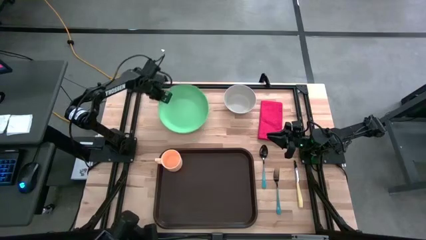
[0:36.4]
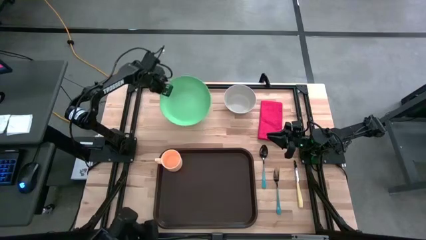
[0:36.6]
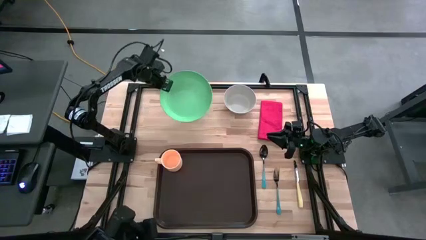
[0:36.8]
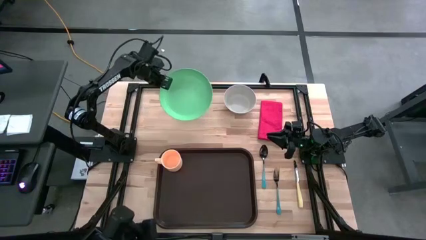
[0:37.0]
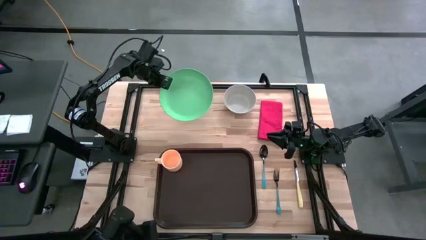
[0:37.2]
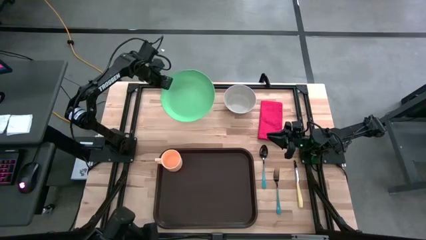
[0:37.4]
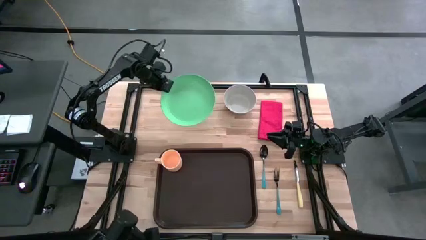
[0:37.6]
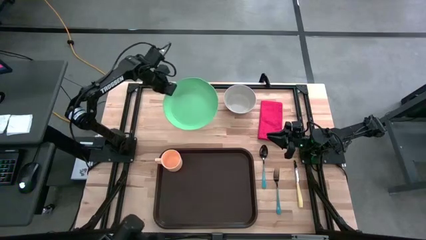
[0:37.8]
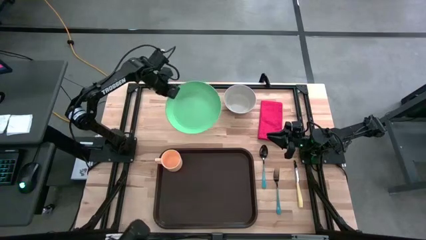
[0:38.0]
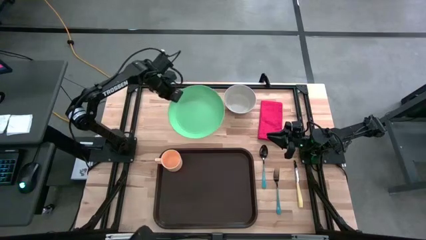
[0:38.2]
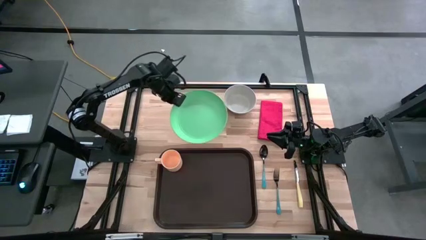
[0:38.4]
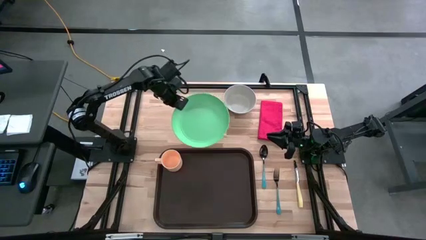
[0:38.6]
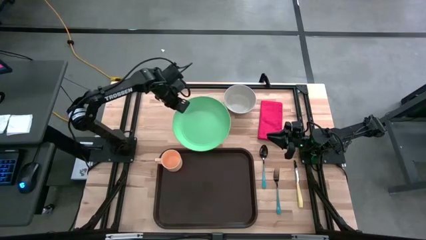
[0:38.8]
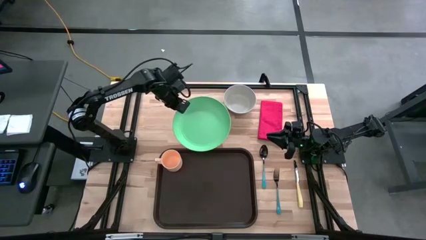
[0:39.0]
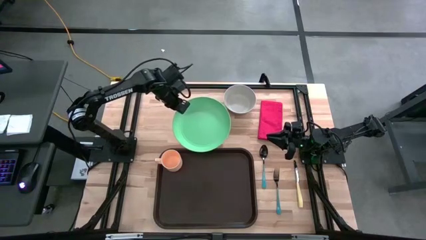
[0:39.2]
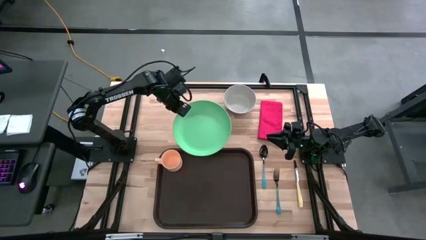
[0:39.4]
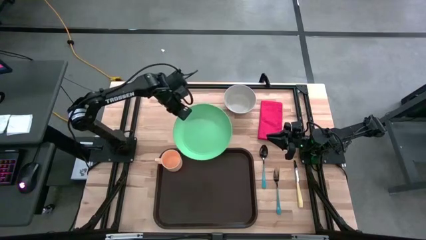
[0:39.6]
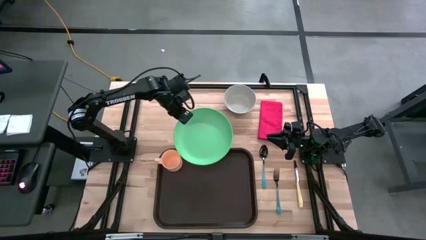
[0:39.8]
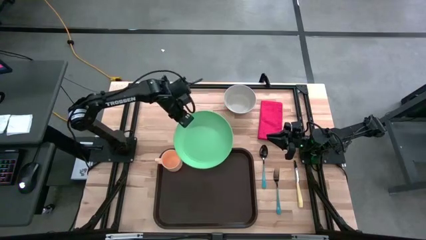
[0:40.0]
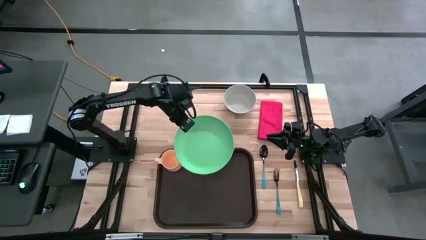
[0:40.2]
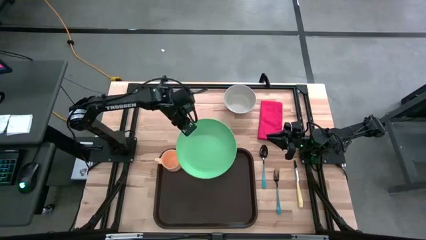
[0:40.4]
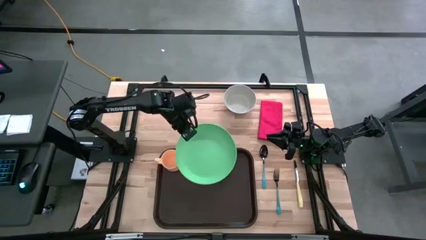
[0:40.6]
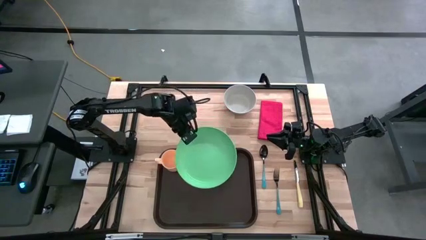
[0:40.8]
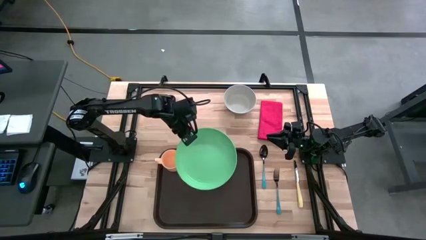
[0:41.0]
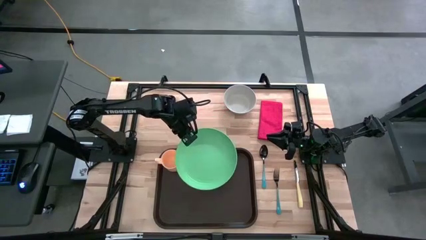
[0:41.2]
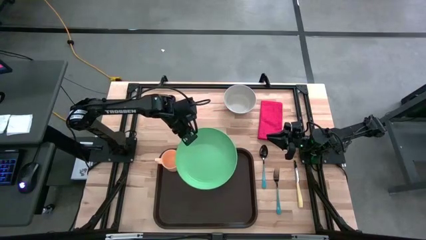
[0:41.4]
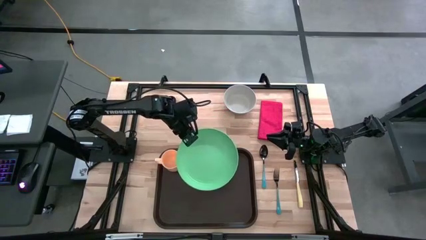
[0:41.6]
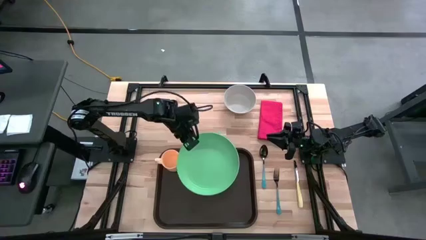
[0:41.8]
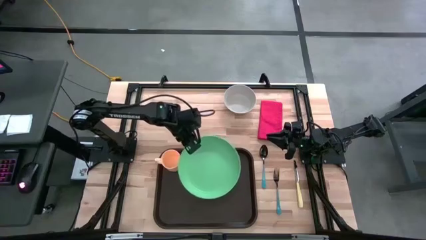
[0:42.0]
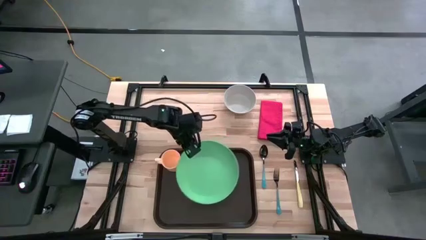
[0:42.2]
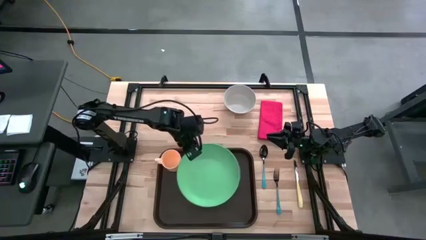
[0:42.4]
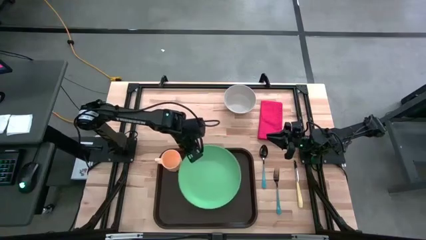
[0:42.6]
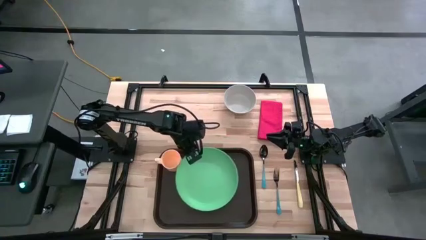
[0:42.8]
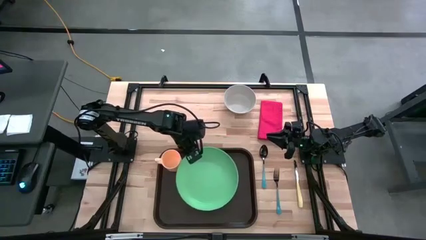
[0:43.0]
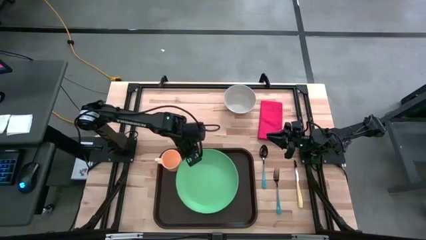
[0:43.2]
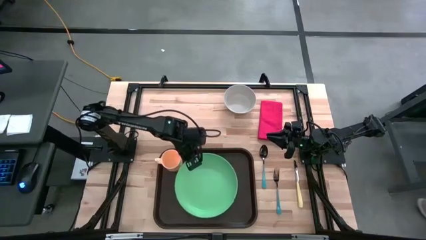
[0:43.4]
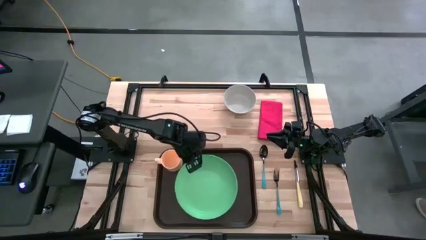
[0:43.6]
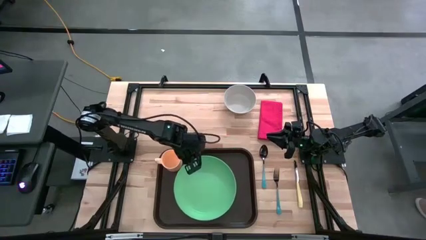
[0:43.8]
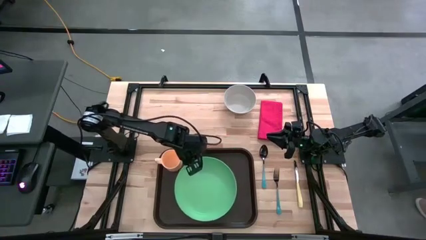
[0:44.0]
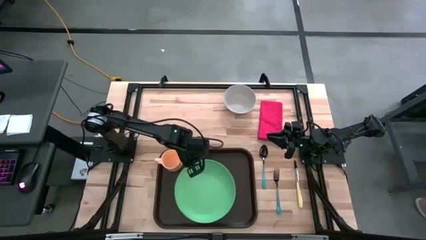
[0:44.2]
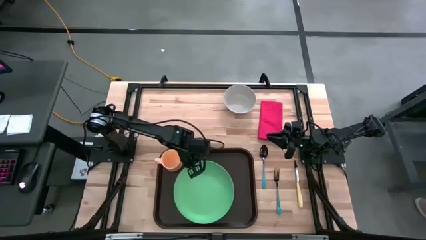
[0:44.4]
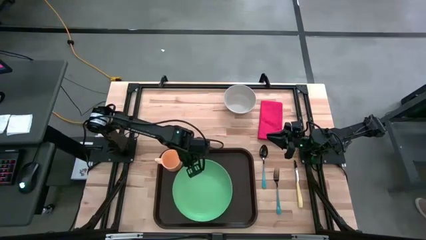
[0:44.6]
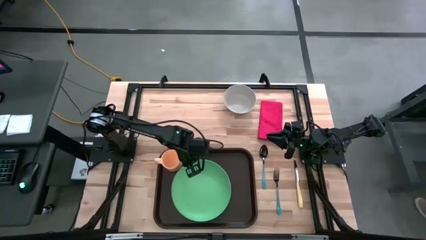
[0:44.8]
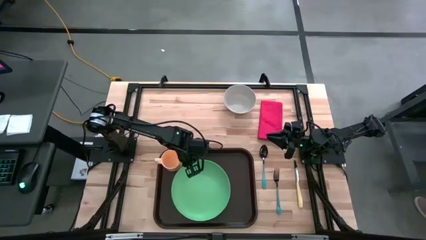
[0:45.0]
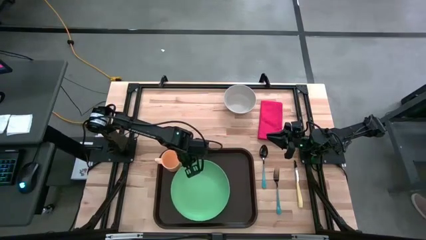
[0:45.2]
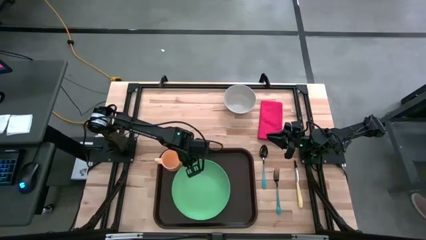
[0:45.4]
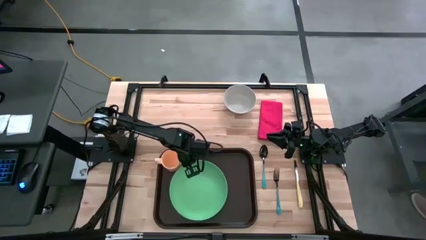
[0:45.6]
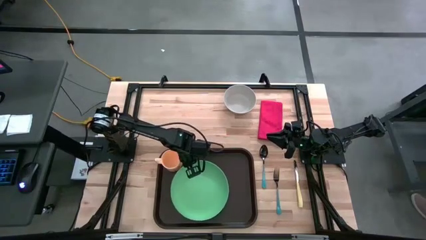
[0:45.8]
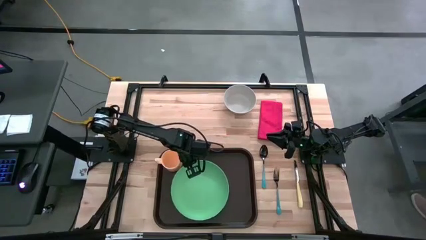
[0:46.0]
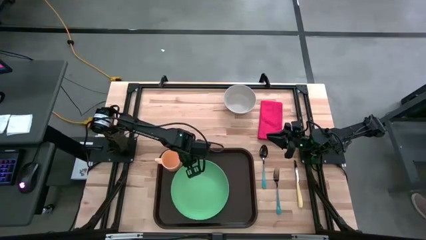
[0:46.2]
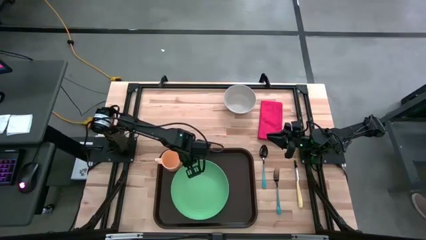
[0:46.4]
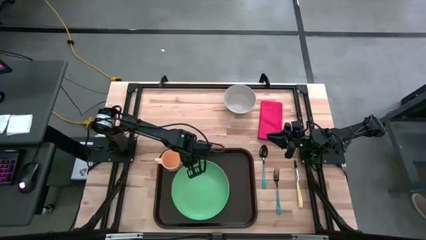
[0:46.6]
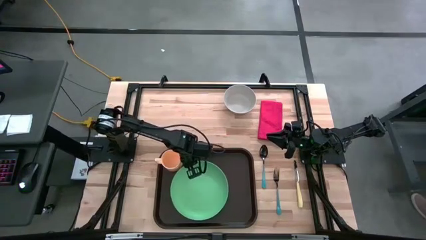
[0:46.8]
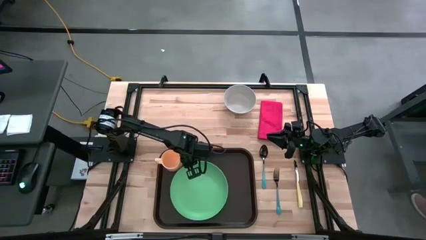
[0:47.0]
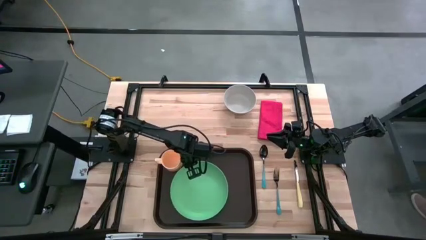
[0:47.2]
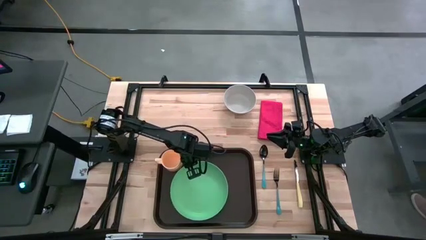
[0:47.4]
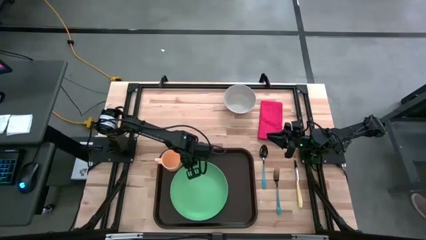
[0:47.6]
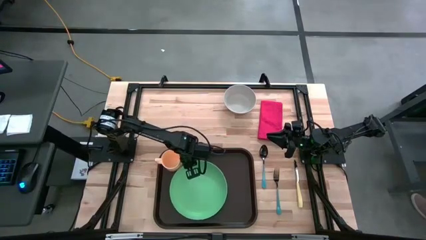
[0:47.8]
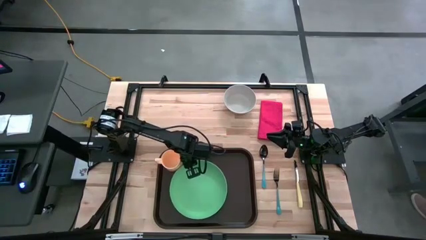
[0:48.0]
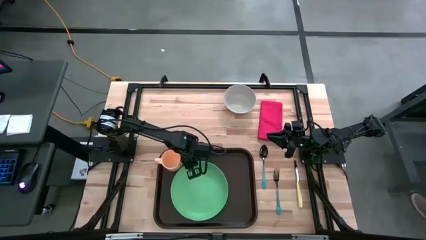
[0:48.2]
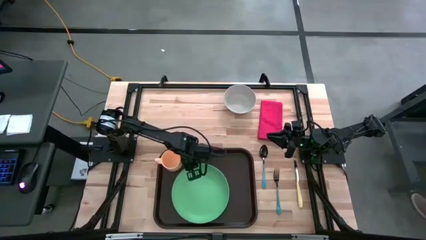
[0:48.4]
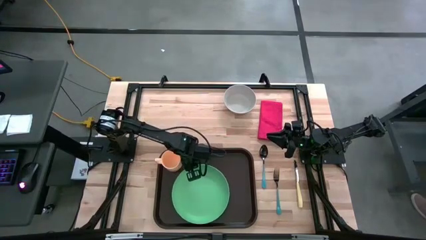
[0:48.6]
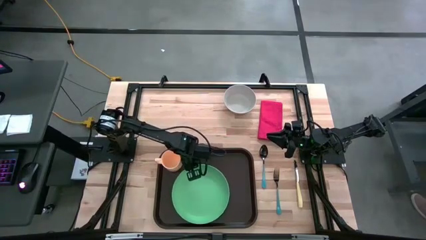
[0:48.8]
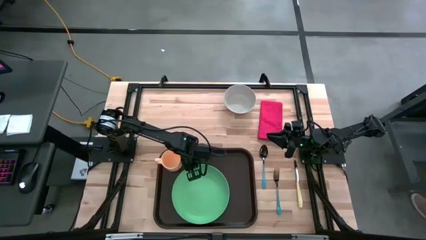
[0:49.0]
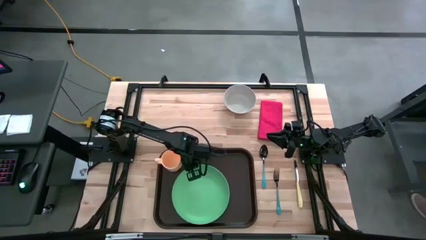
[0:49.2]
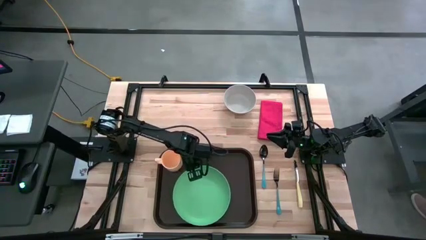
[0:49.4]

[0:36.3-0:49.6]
Task: Set up tray
Put the green plate to the bottom right of the orange cup on the brown tray

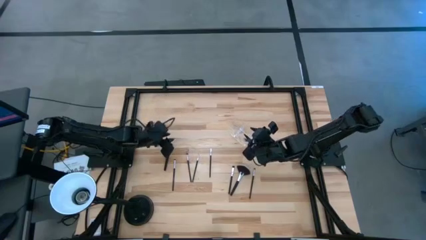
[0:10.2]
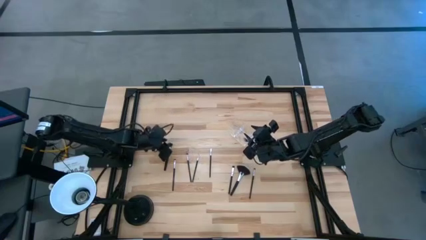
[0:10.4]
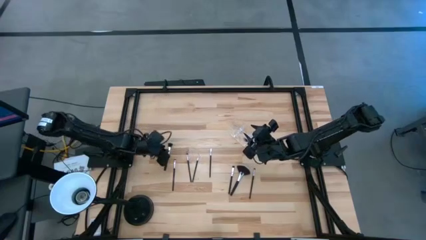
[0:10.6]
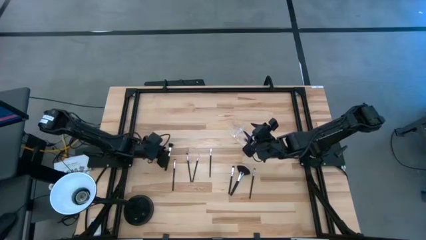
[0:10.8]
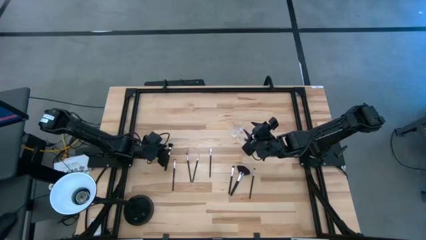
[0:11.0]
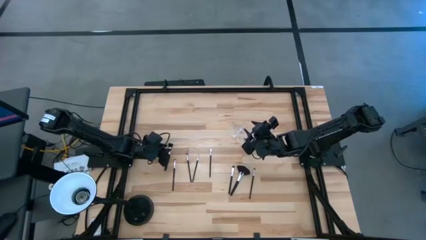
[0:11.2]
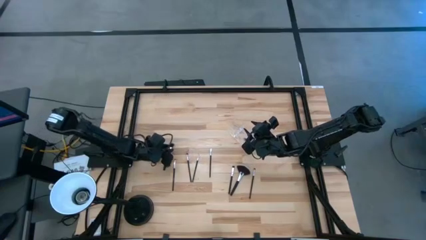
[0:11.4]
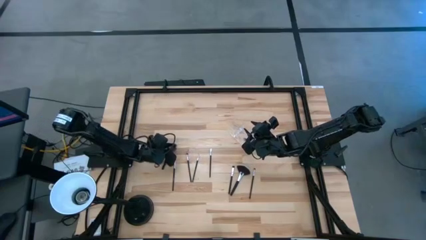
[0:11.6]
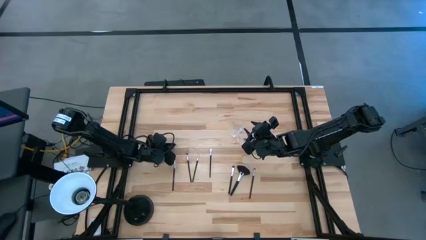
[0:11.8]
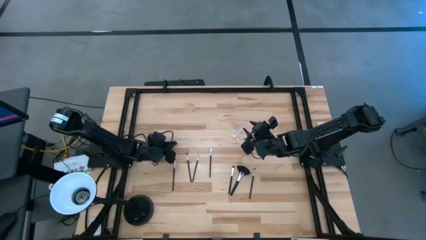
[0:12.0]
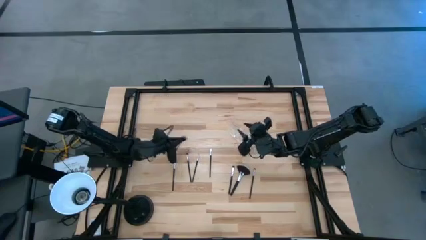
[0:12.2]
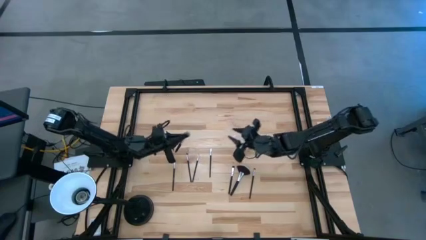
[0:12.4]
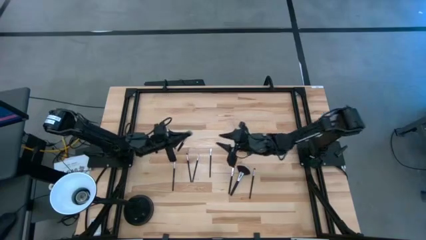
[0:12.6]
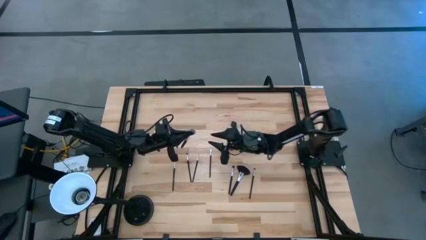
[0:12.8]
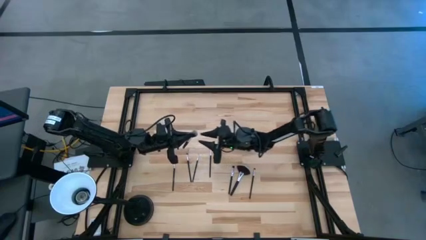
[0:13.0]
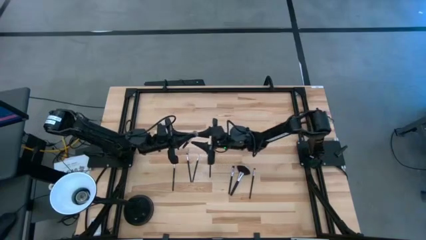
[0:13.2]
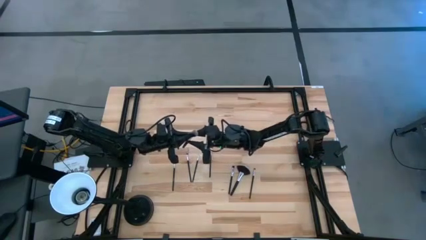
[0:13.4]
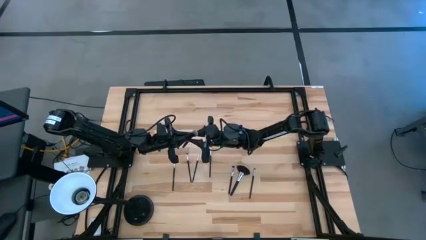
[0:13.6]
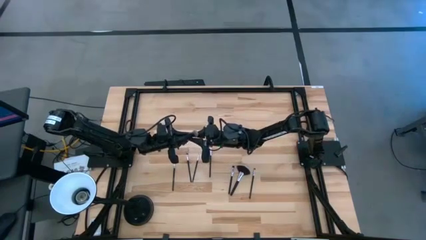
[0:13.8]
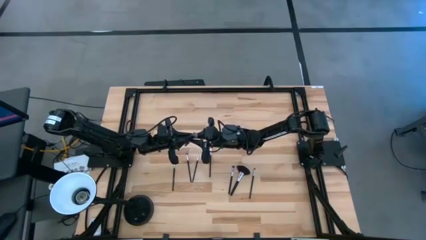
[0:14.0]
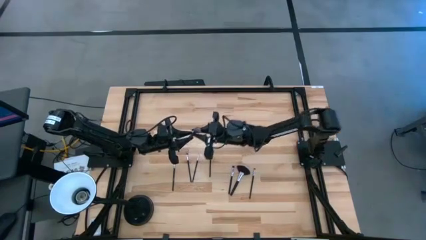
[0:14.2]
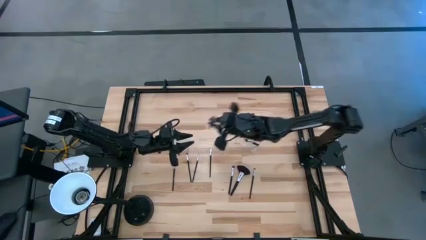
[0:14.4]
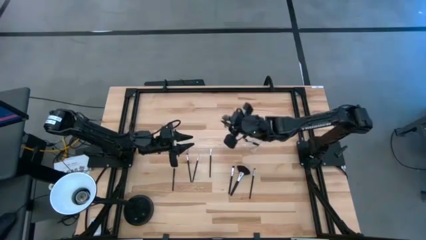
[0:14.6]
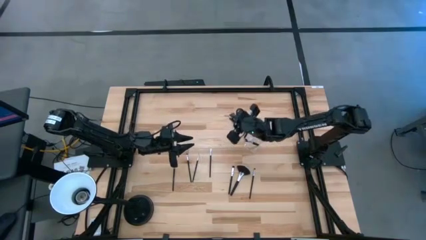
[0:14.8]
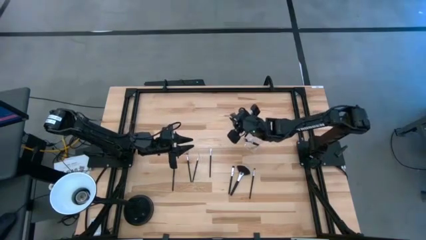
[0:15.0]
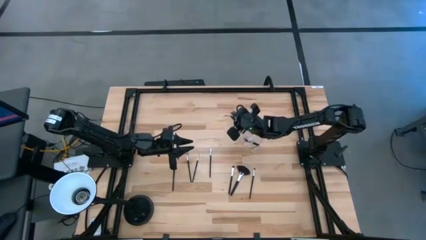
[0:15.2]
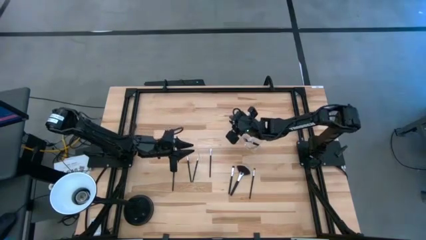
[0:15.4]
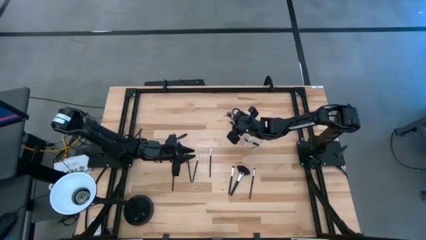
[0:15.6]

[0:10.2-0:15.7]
Task: Put items in baskets/containers
Put the blush brush into the transparent organizer
